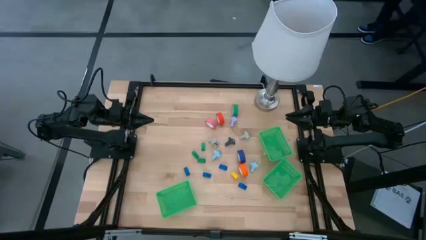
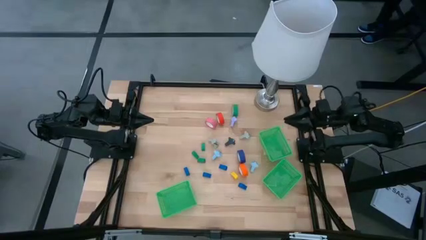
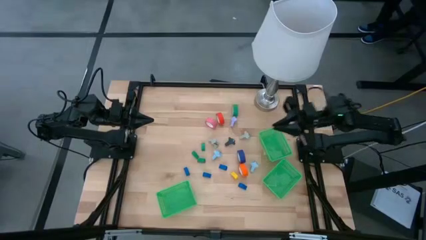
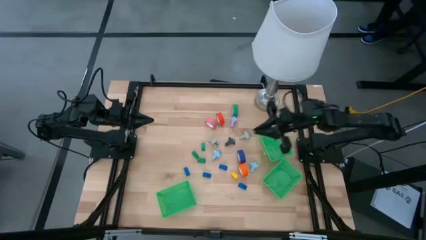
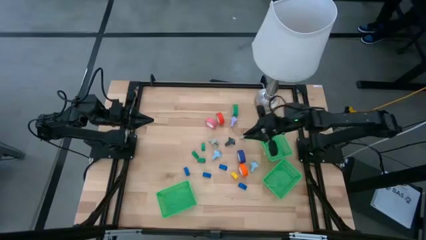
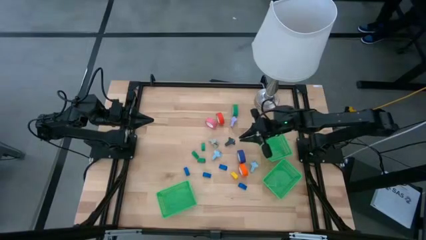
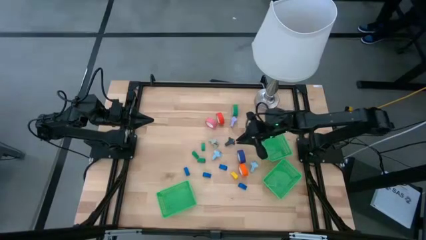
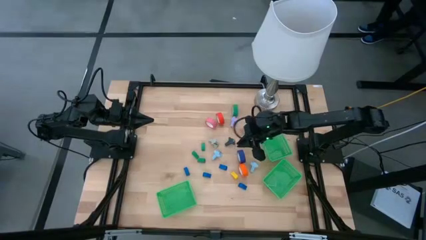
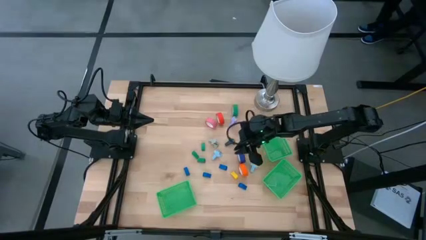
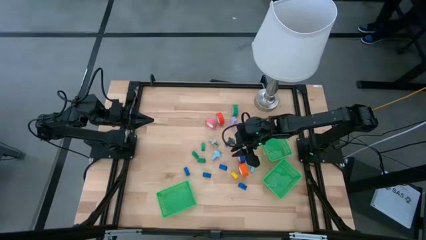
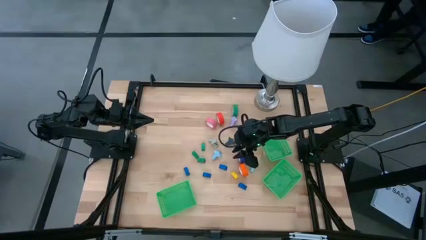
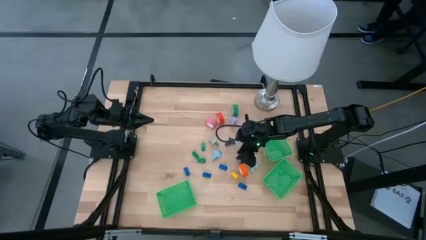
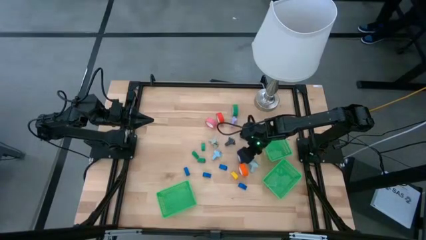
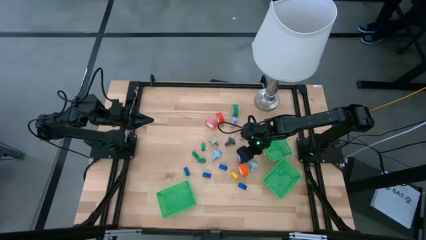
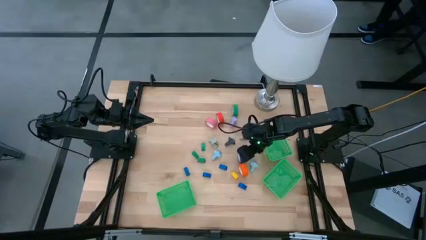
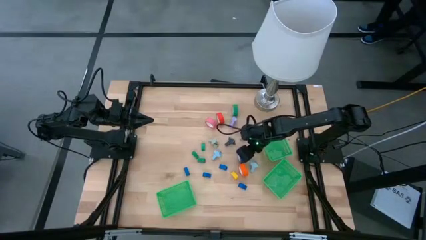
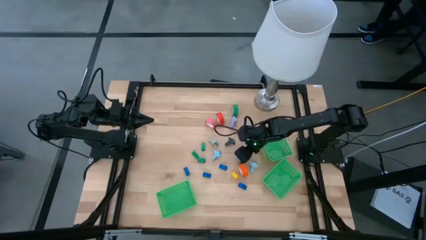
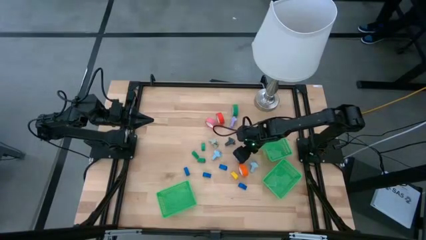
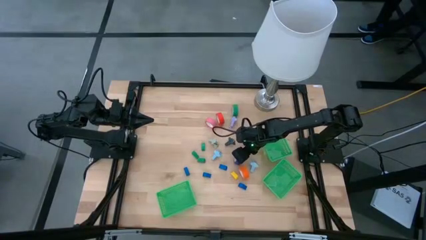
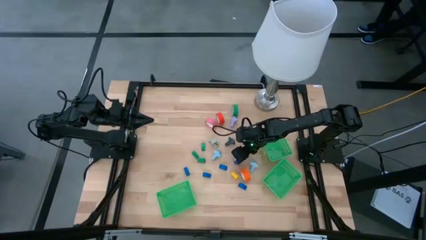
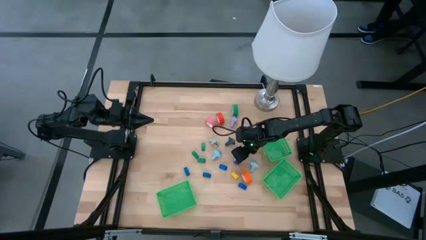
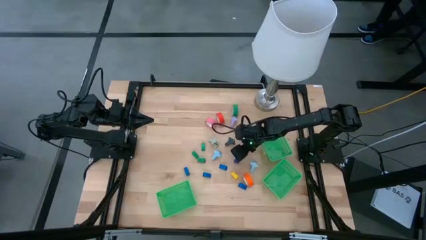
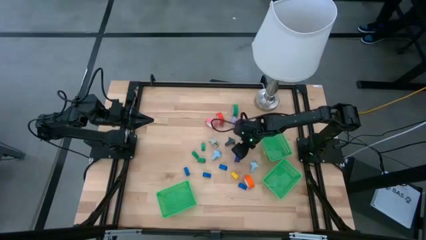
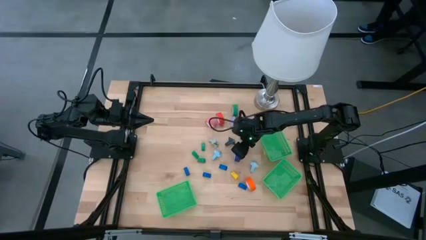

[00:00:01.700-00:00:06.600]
Task: Pick and place Stapler, Stapler remover, tape
Put the blue tape into the top right green bin

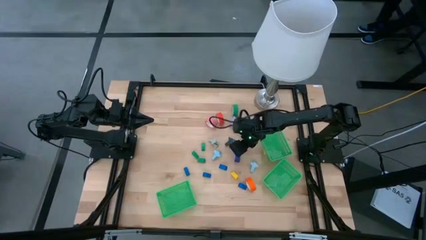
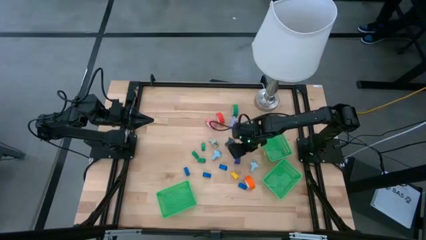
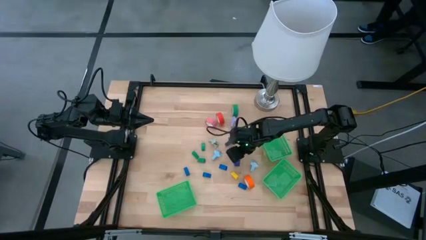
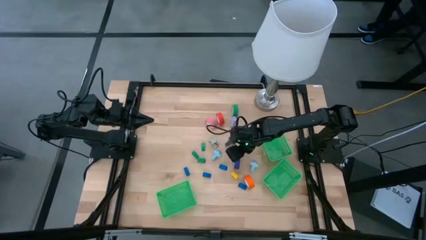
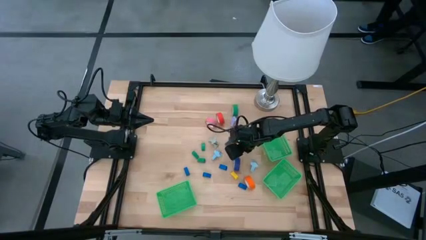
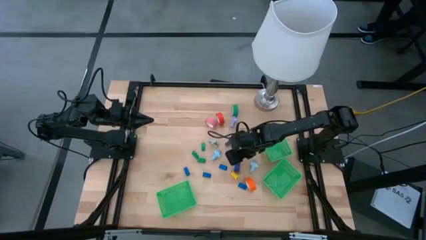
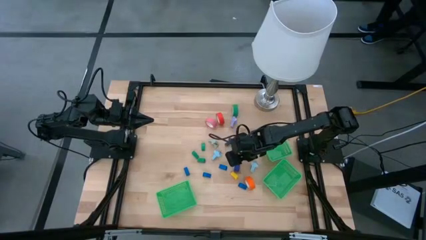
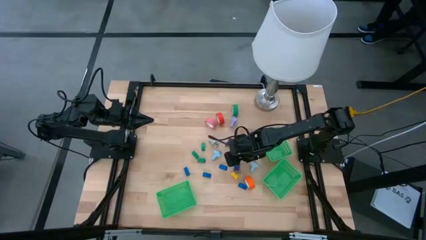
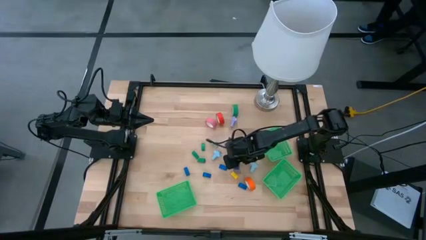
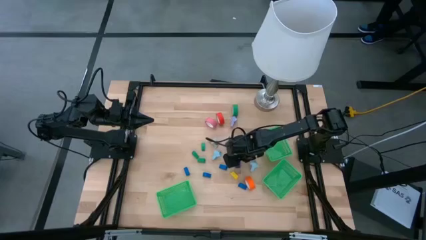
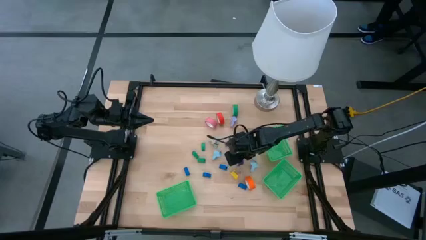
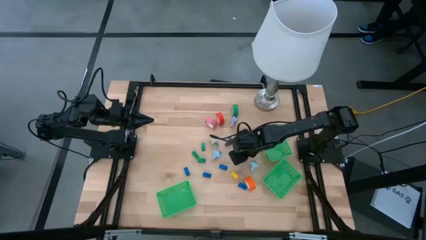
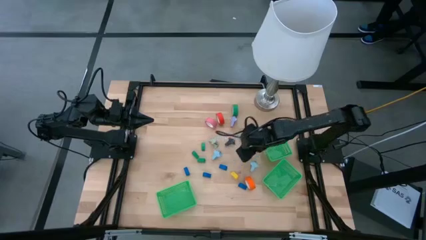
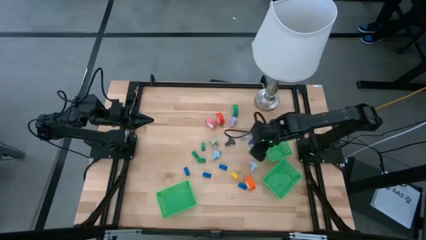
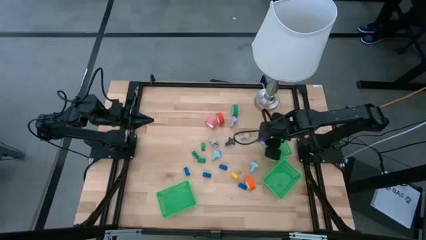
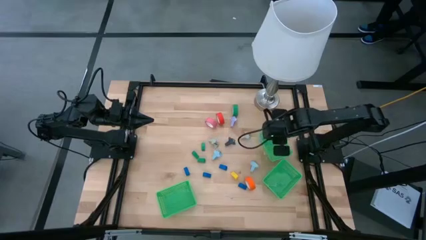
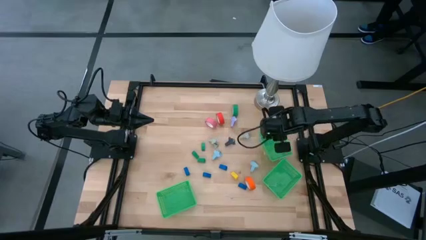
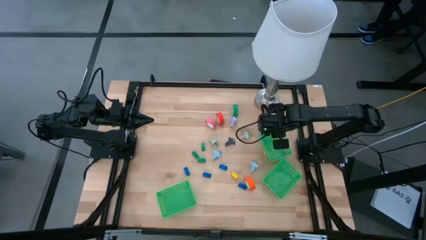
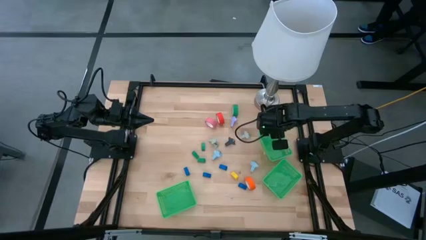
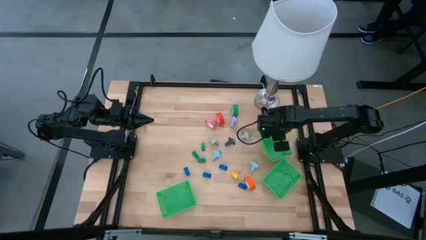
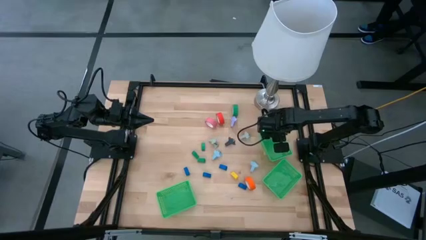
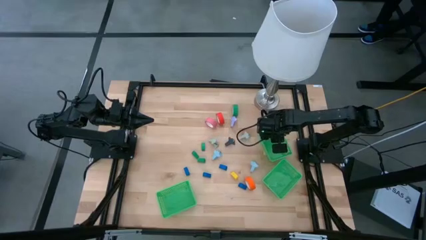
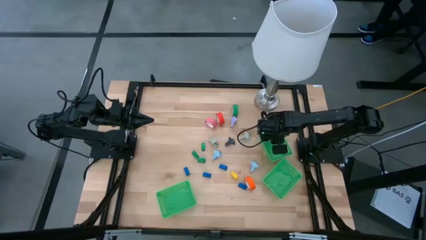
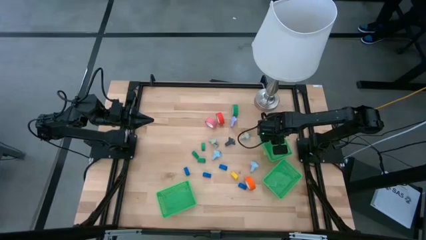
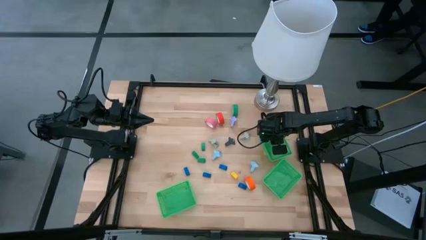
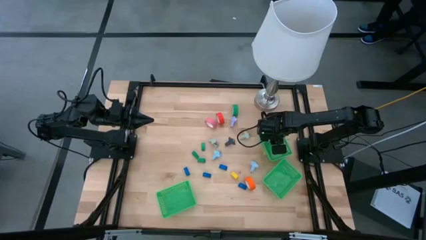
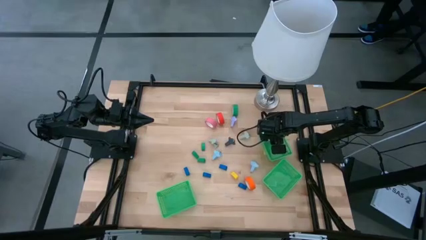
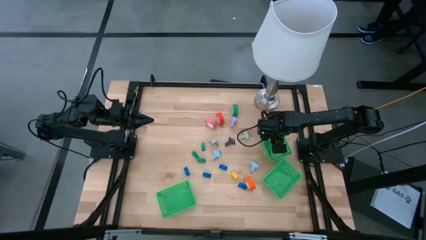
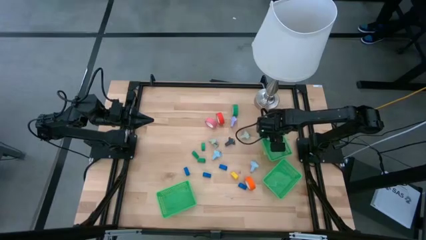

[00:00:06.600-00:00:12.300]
Put the blue tape into the top right green bin

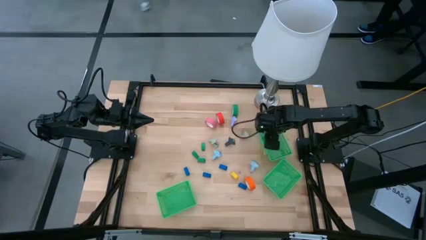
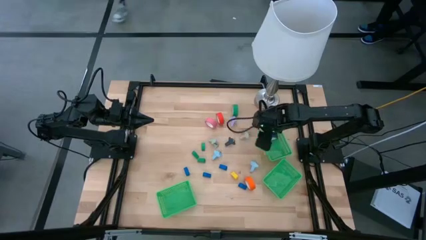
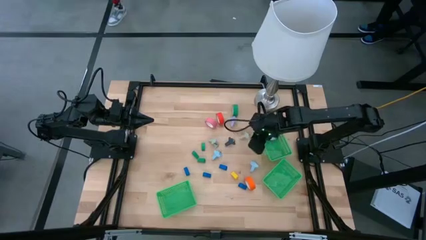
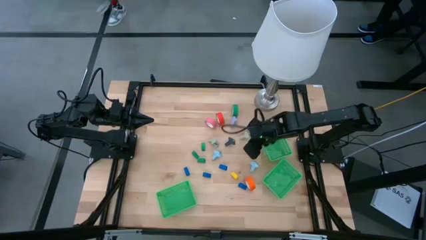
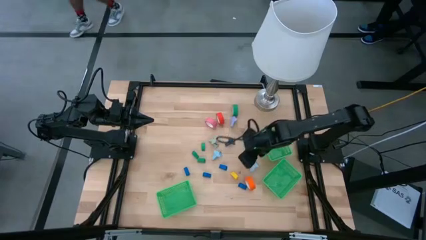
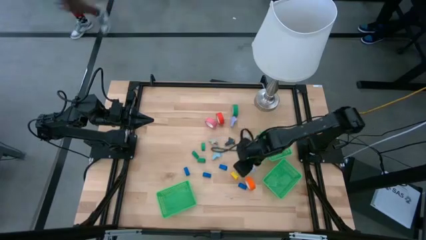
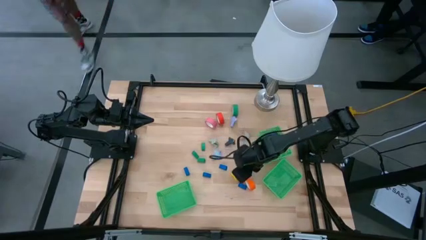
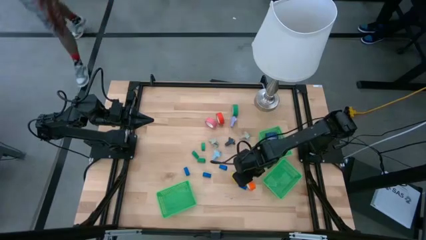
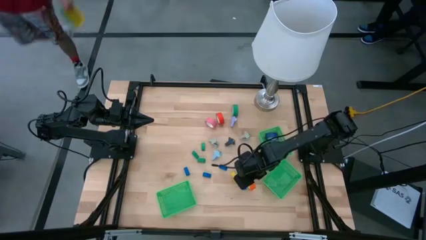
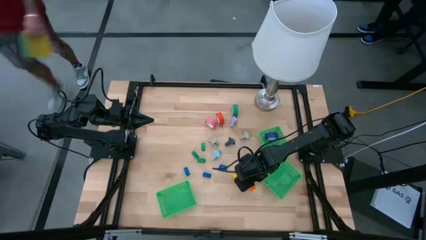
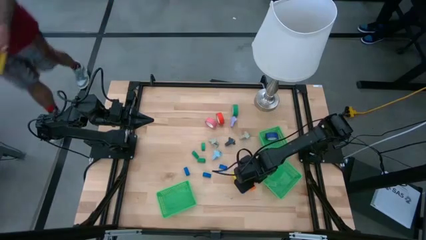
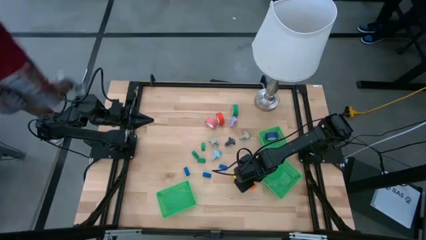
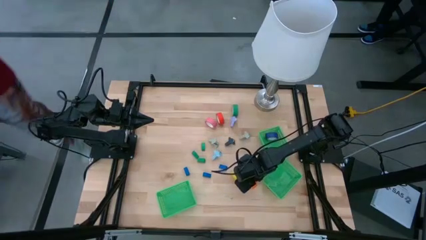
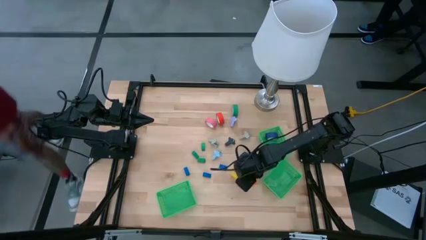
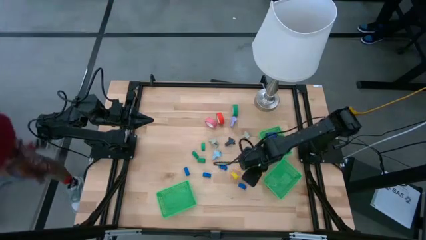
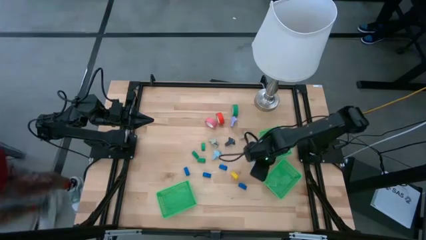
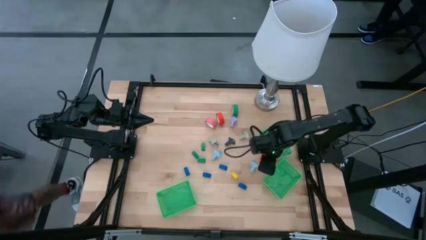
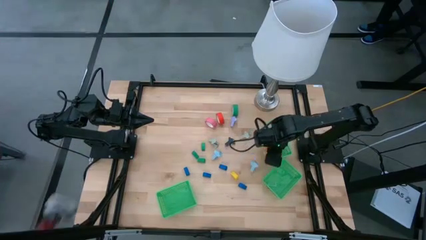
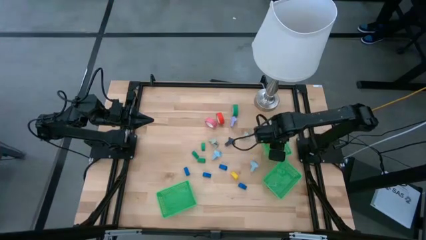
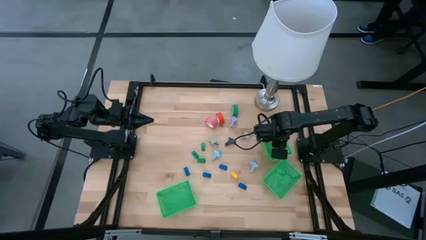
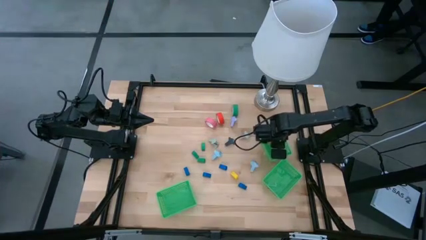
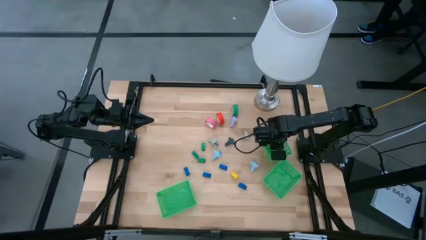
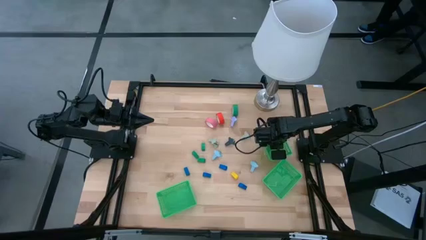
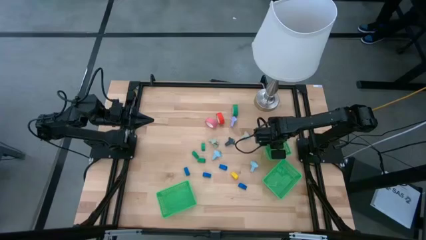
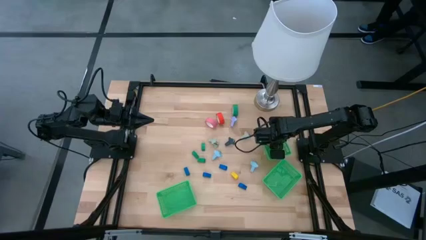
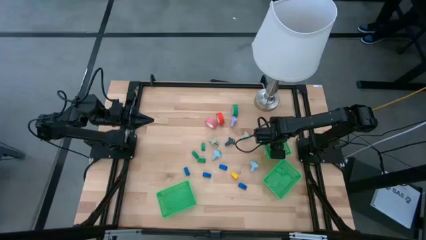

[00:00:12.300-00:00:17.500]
Put the orange tape into the top right green bin

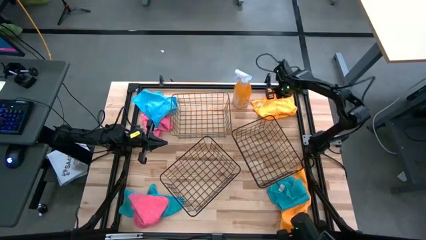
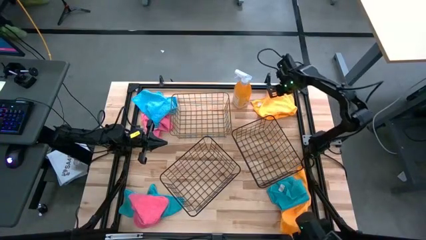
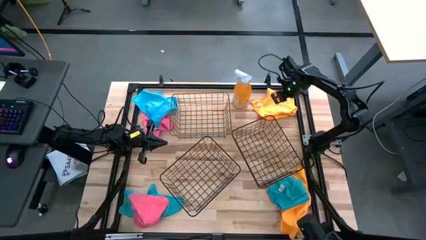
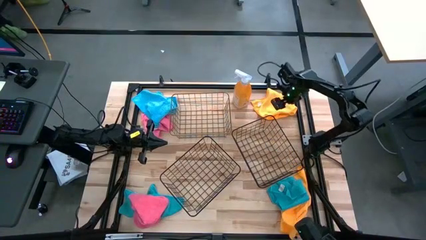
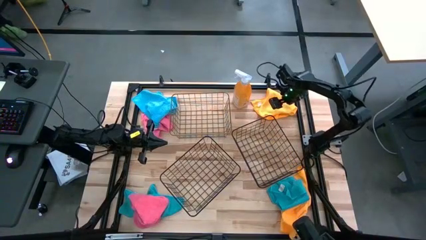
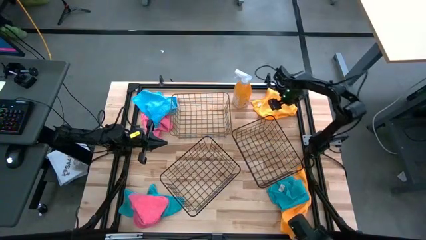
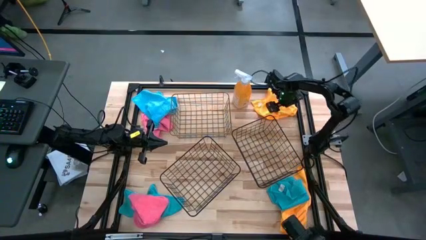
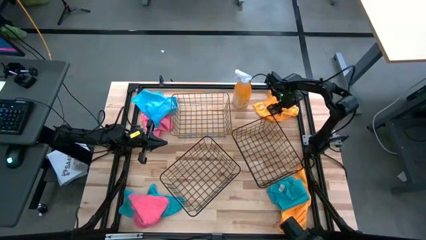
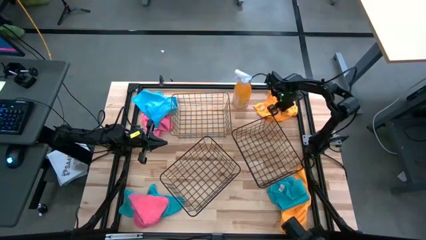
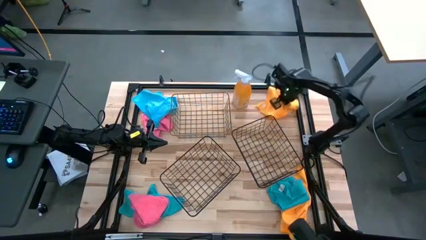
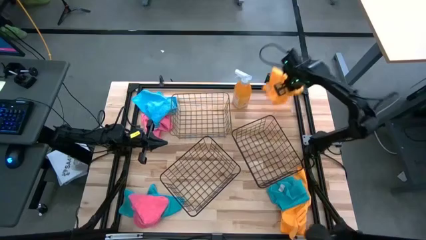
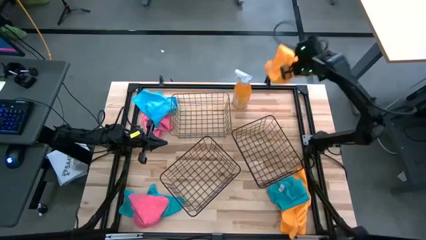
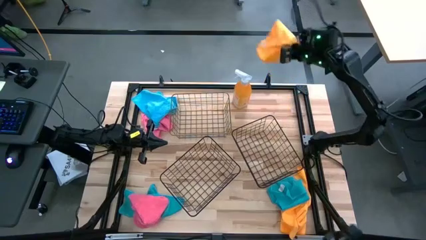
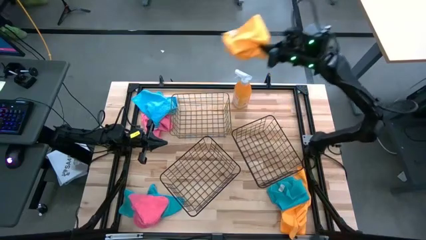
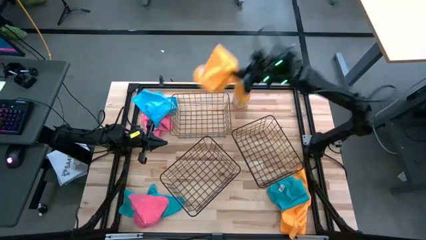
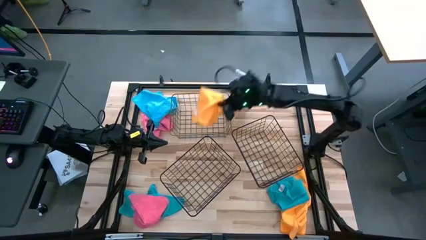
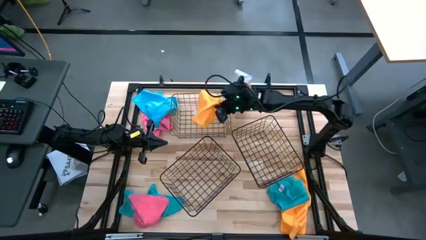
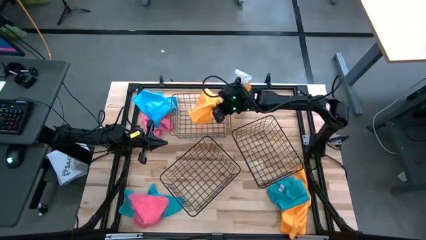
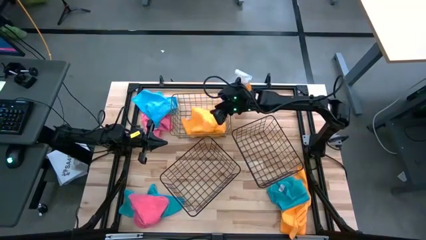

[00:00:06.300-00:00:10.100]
Task: Sort microfiber towel by color & place in baskets
Put the top yellow microfiber cloth into the gold basket
